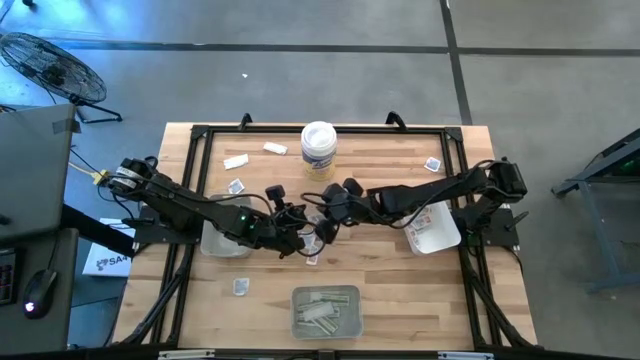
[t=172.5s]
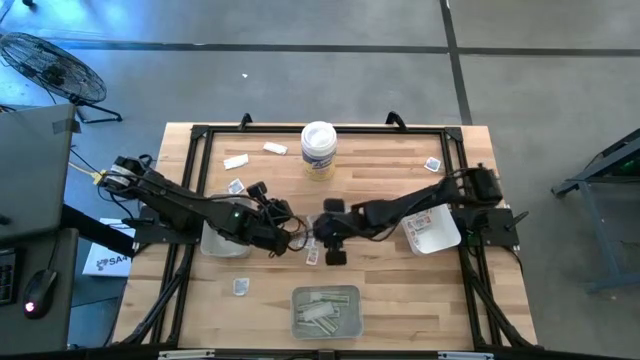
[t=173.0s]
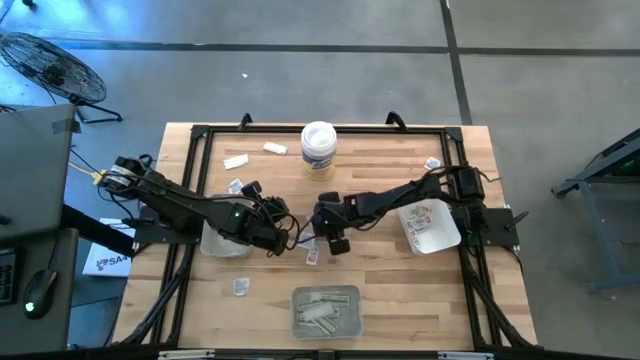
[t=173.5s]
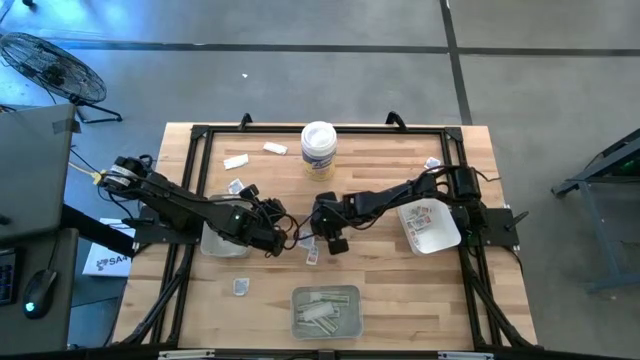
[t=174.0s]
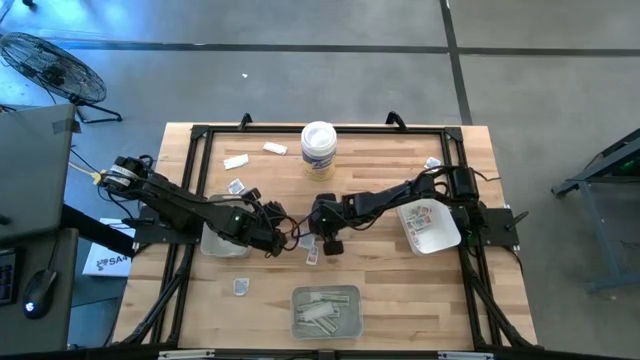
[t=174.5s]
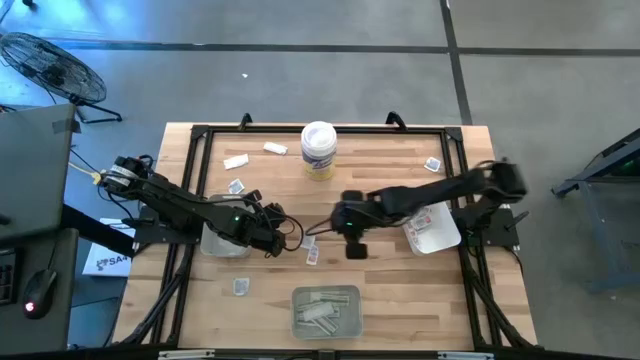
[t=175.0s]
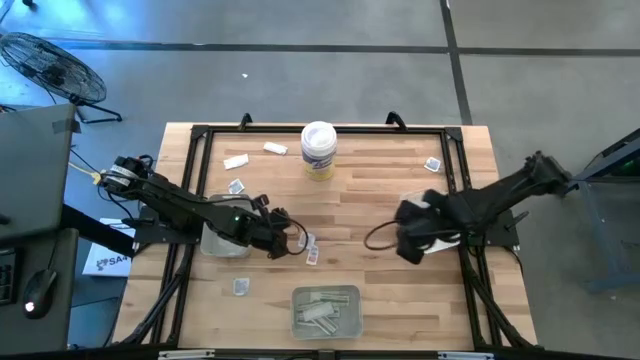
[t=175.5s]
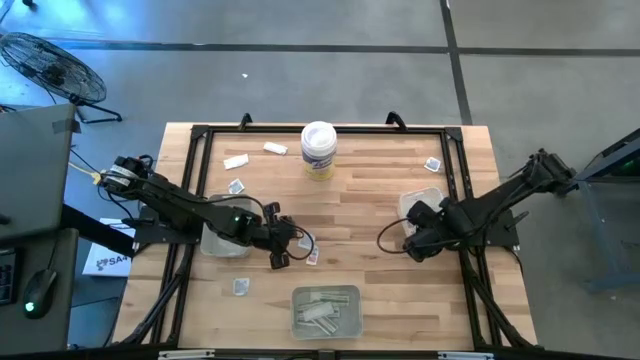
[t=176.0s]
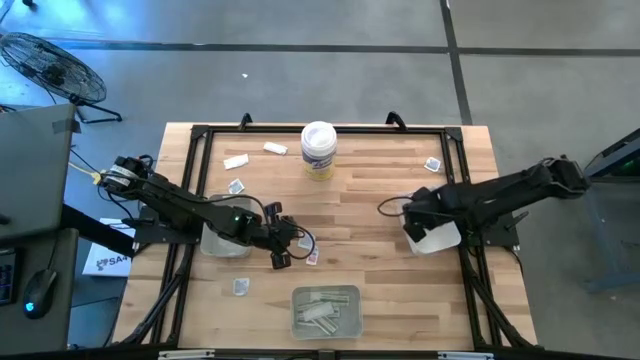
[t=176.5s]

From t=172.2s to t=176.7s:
Task: Pick & Place First Aid Supplies
Put the orange ointment pack into the white bin

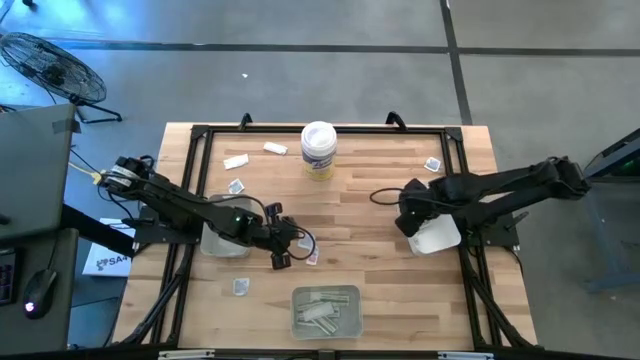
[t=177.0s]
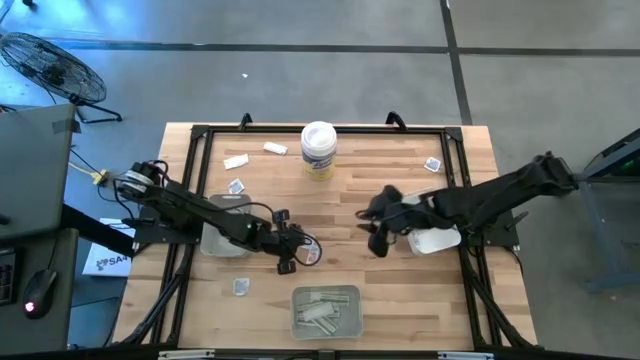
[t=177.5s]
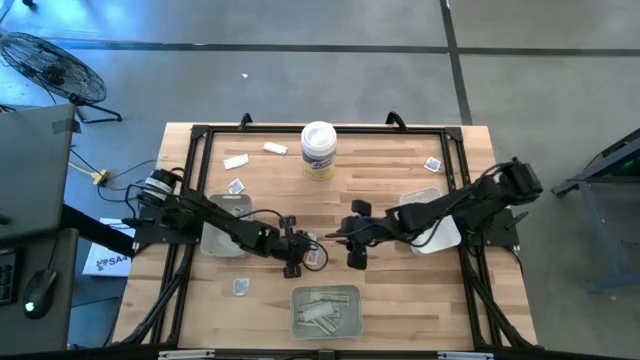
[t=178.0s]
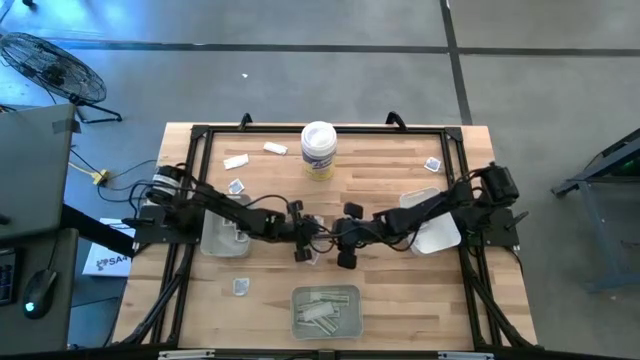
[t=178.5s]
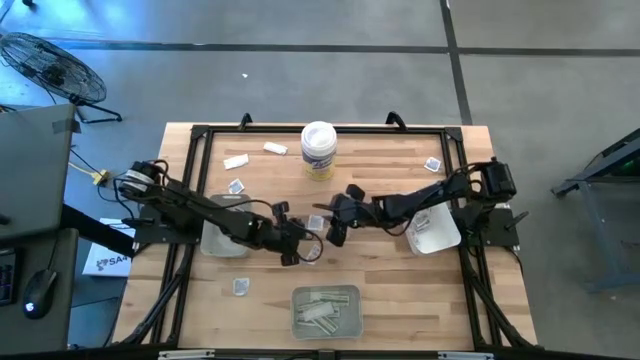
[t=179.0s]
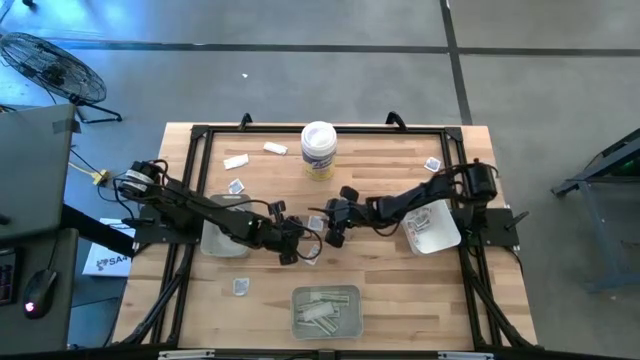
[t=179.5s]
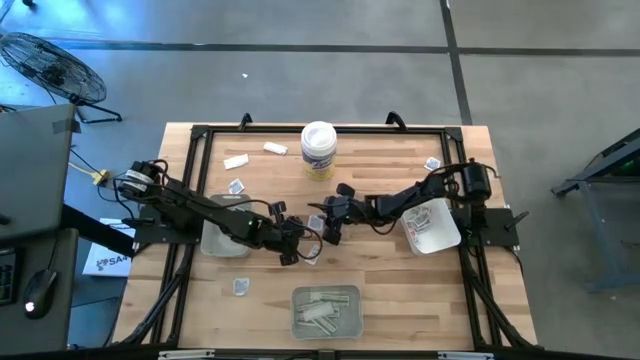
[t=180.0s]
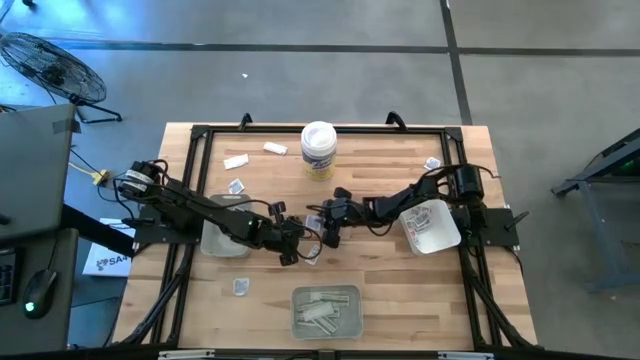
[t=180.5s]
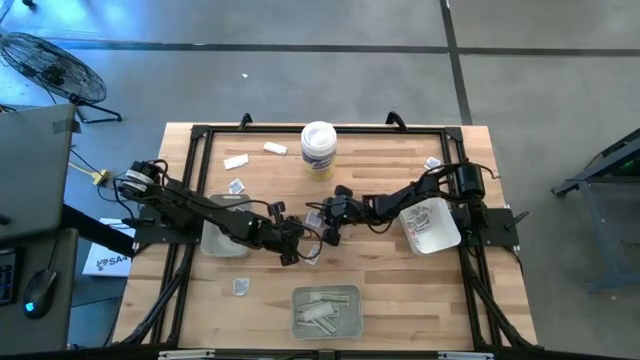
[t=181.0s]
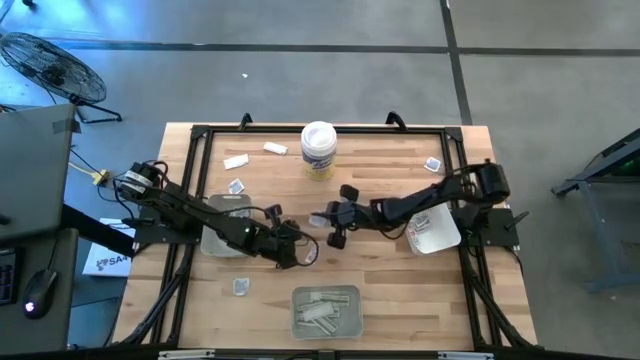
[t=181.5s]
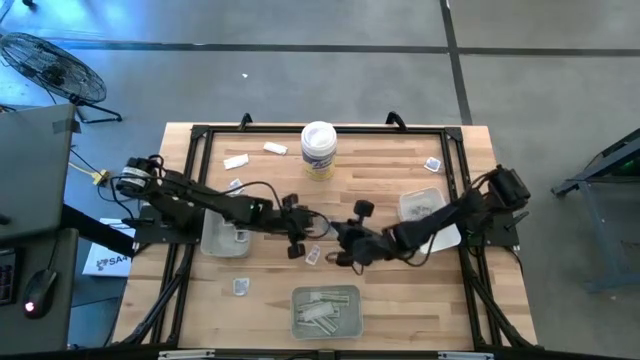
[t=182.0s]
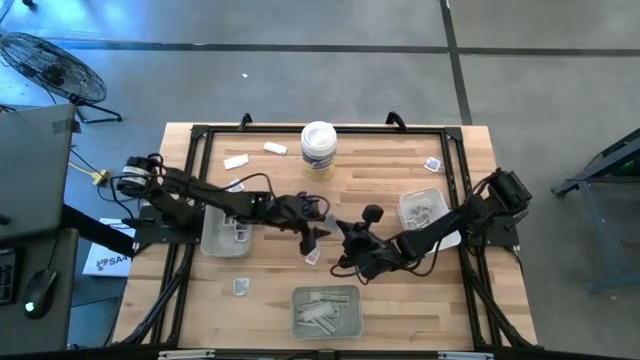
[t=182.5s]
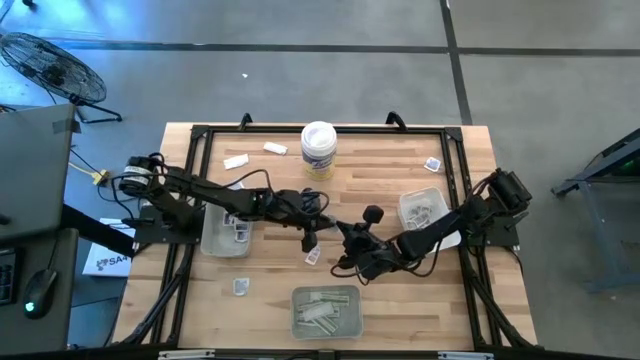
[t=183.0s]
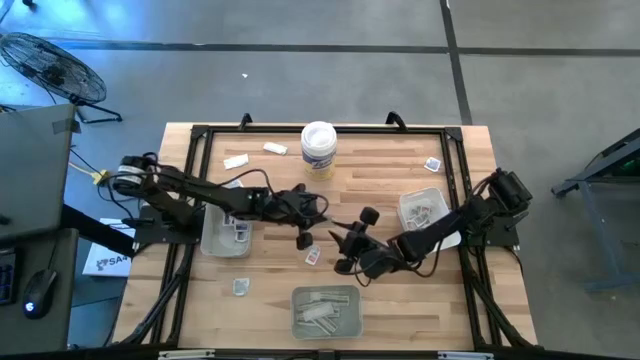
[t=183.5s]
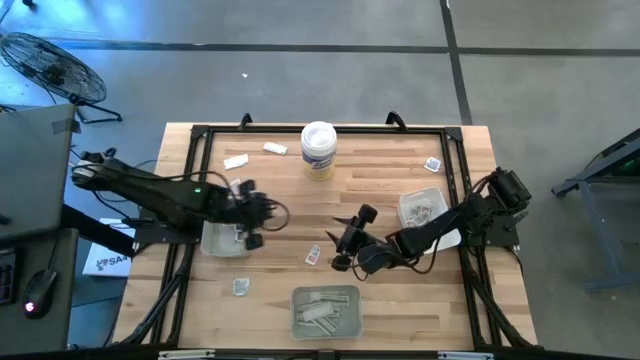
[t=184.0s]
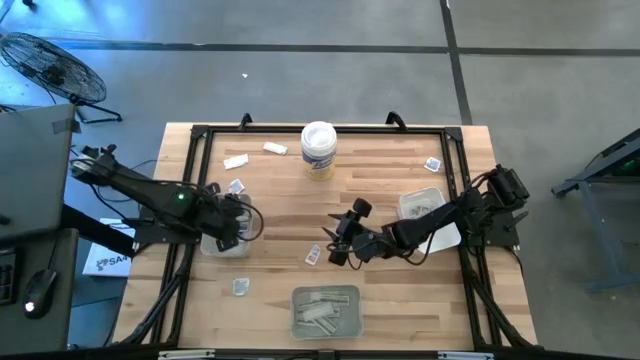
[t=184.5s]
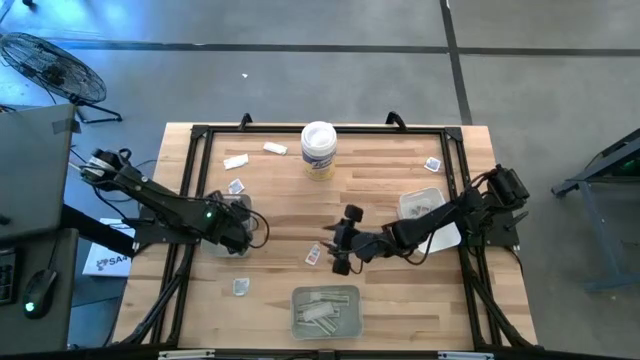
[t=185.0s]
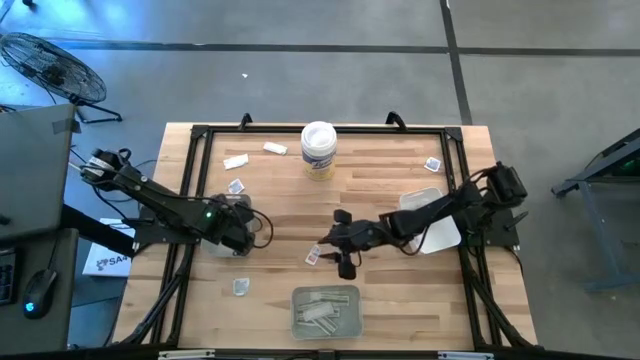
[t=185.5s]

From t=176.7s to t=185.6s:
Put the blue alcohol pad into the top gray bin

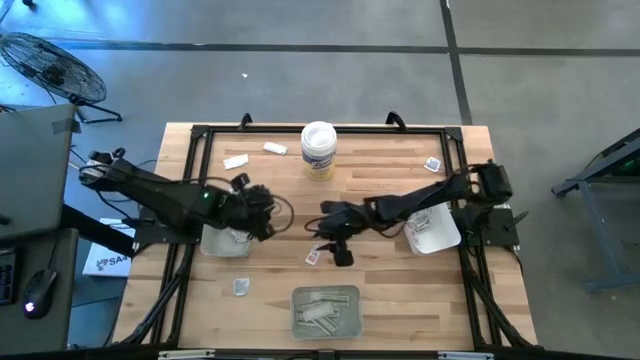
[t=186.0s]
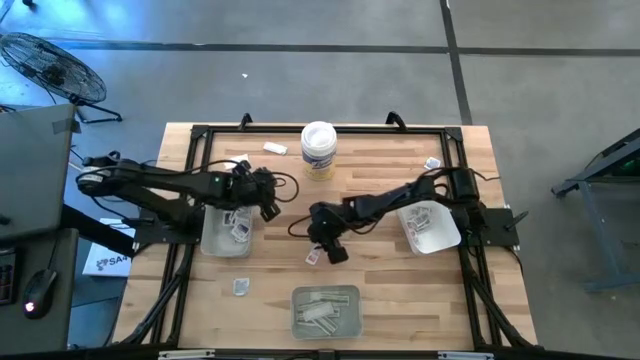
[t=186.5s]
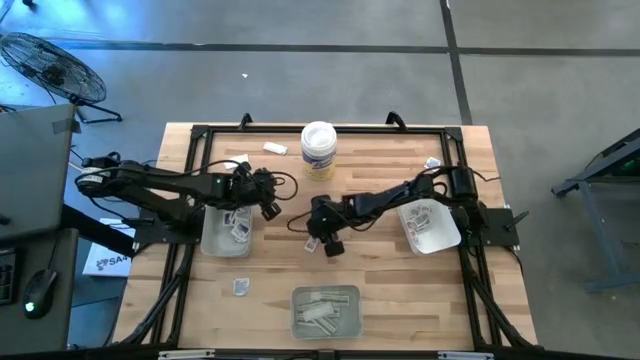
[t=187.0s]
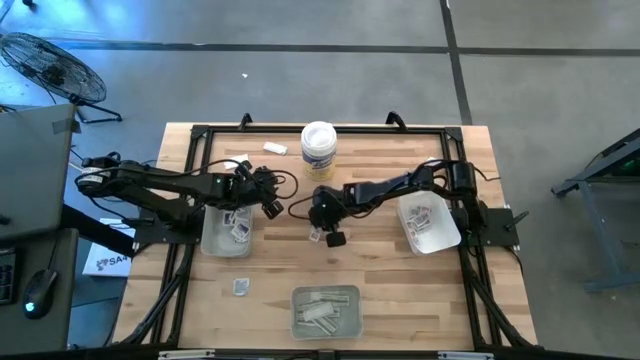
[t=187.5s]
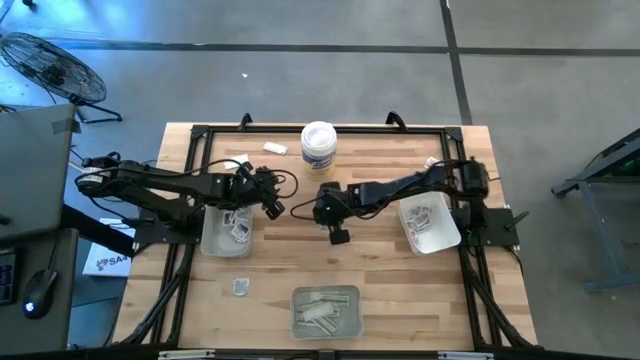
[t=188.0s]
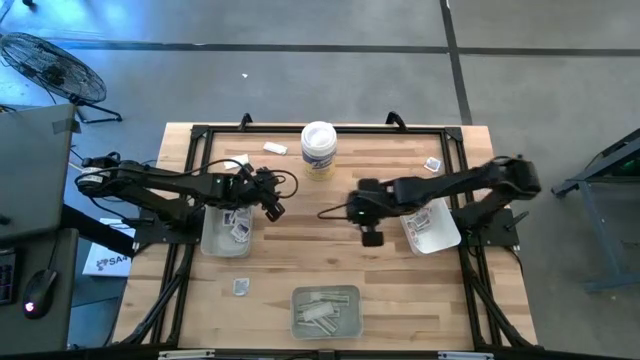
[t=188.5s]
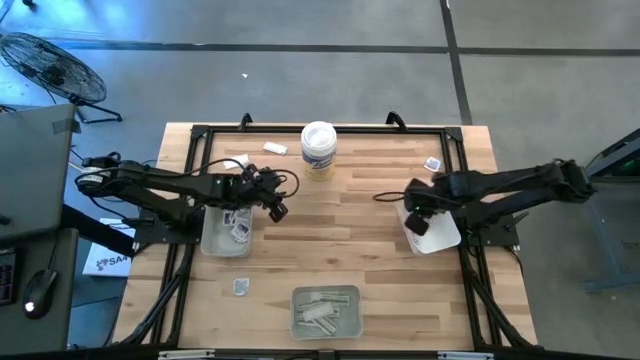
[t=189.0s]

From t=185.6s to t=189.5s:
Put the orange ointment pack into the white bin

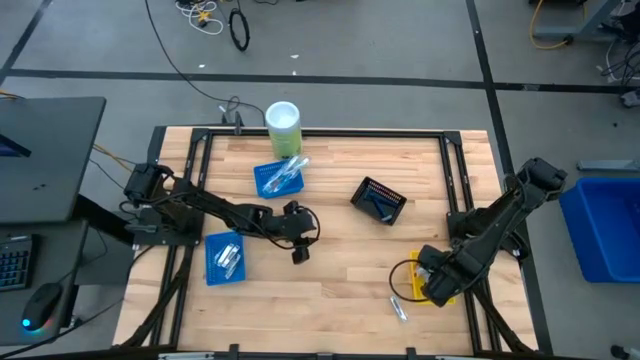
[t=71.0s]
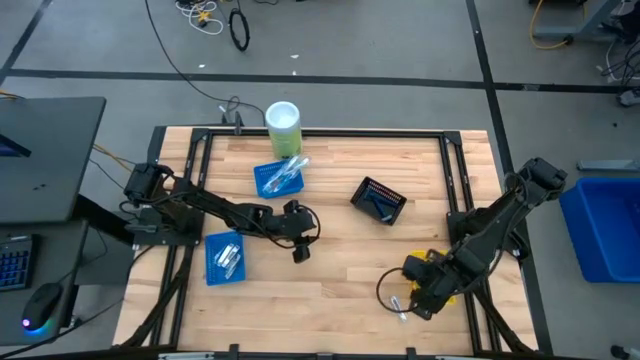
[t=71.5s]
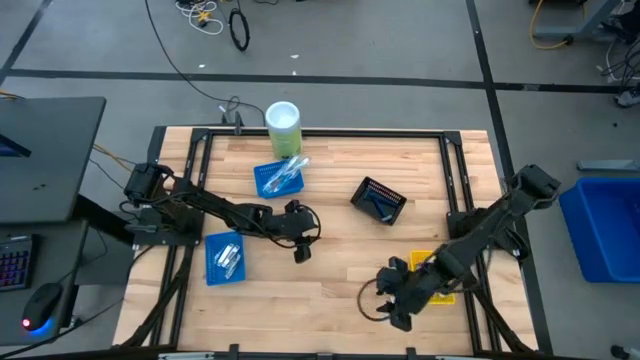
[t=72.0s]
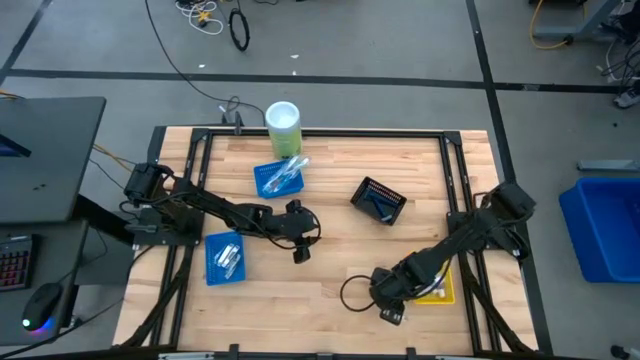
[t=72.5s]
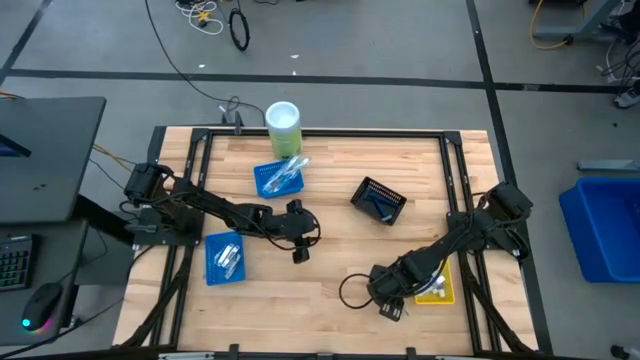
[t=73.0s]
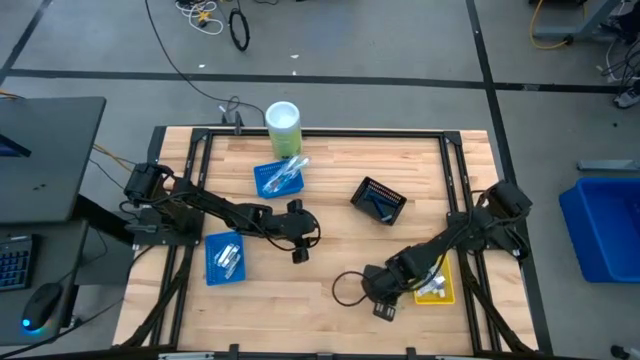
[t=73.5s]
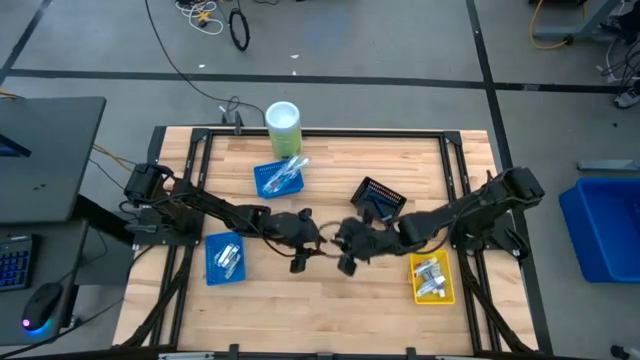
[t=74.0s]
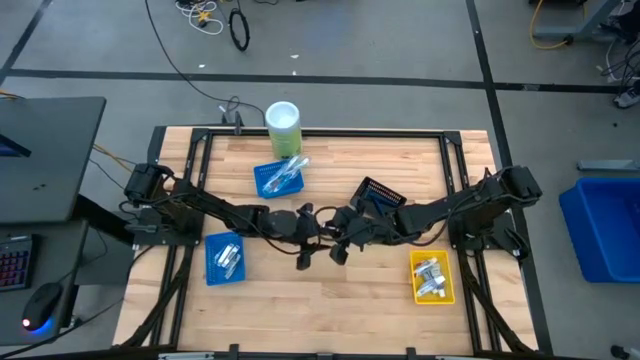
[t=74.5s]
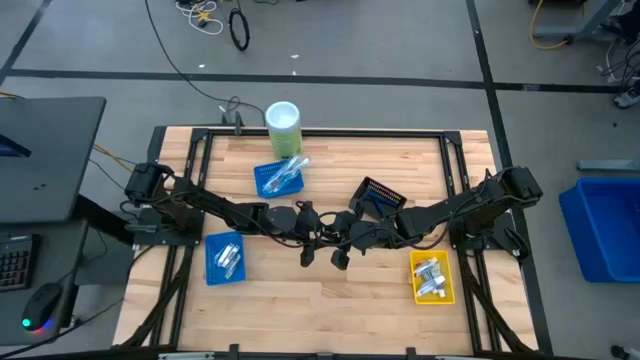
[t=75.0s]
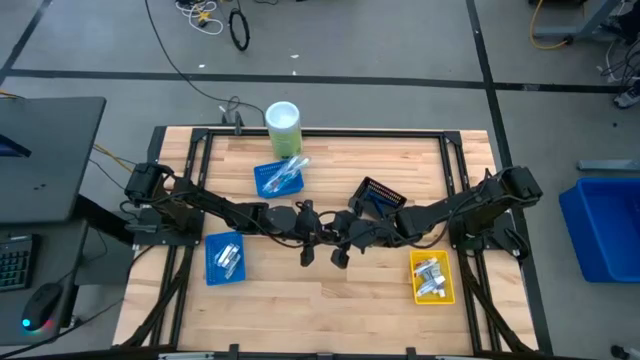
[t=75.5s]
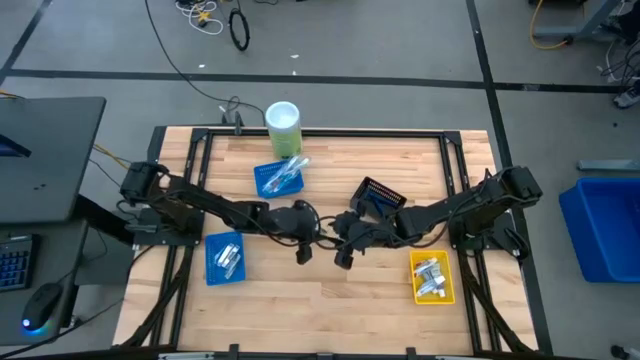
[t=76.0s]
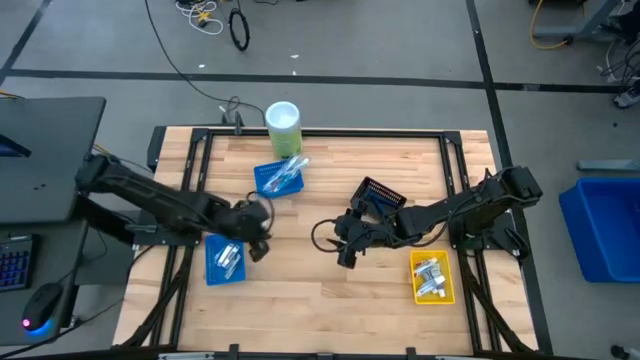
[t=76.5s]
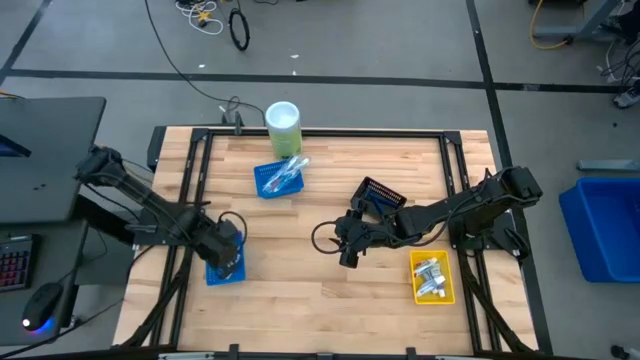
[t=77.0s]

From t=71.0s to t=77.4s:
Task: Pick & Place Travel size toiletries
Put the silver nail cutter into the bottom blue bin
